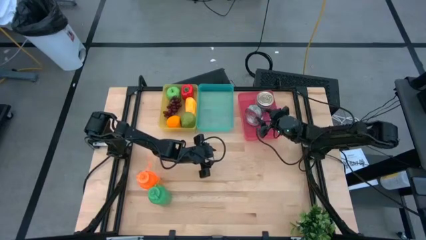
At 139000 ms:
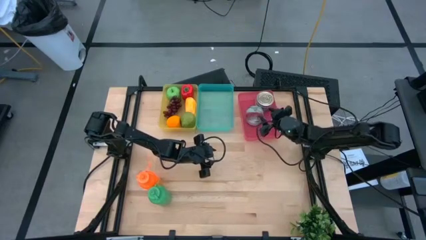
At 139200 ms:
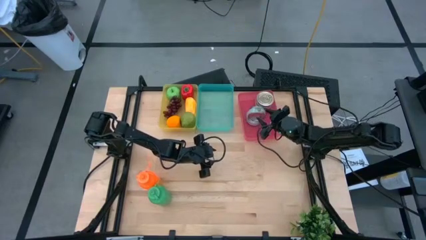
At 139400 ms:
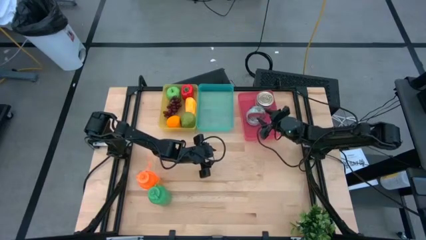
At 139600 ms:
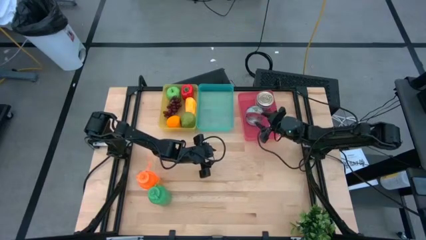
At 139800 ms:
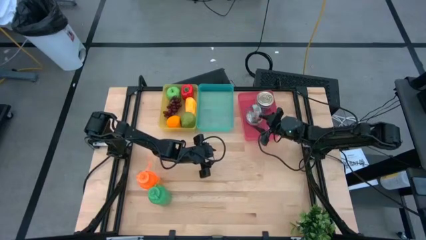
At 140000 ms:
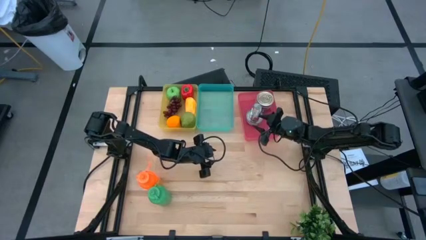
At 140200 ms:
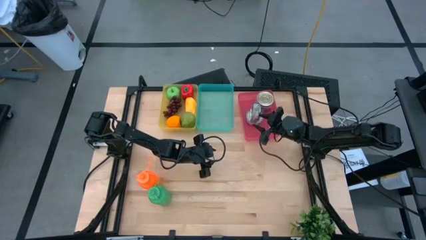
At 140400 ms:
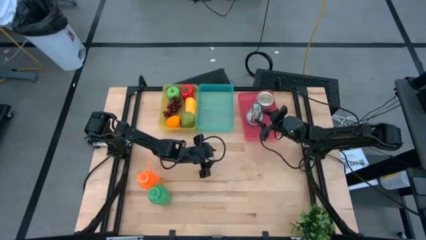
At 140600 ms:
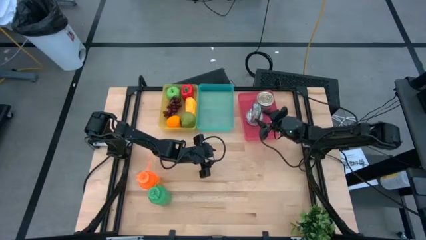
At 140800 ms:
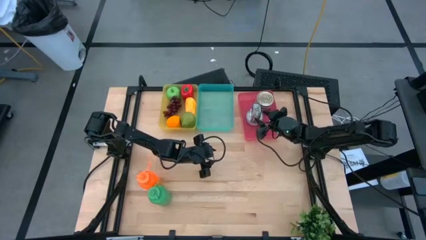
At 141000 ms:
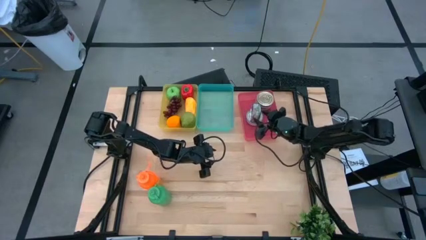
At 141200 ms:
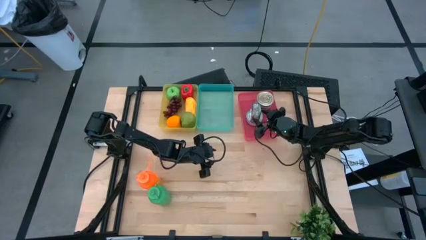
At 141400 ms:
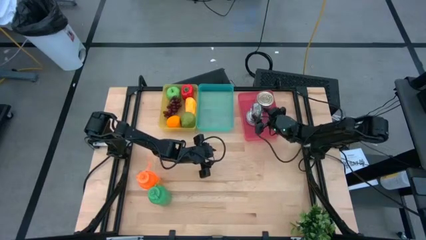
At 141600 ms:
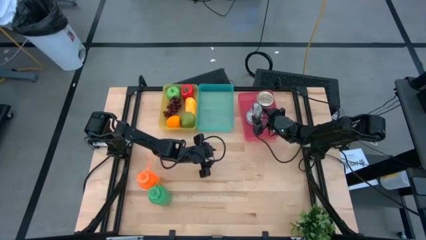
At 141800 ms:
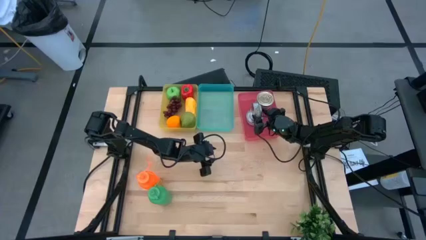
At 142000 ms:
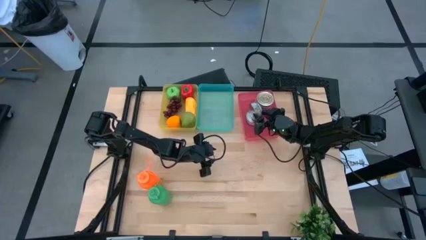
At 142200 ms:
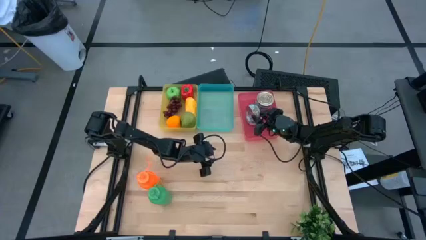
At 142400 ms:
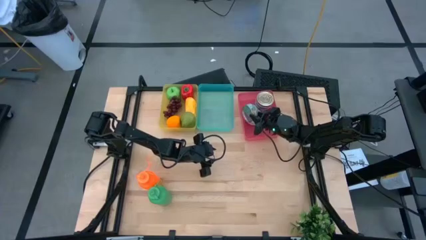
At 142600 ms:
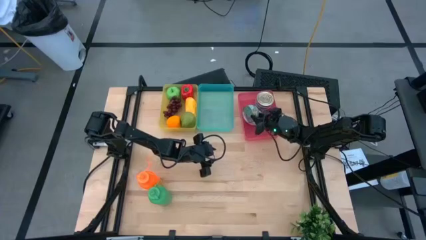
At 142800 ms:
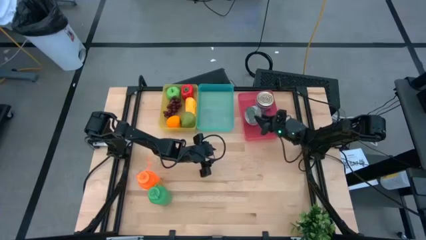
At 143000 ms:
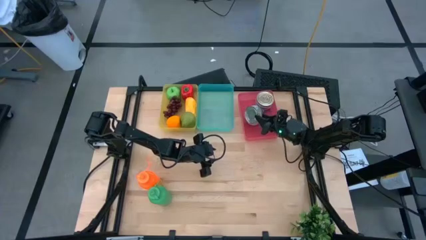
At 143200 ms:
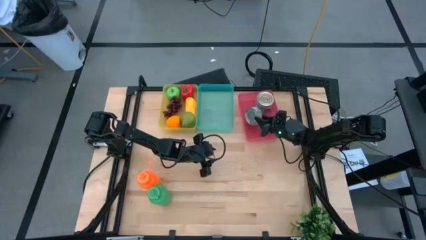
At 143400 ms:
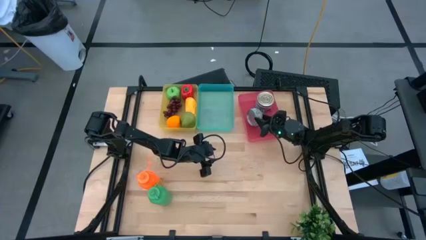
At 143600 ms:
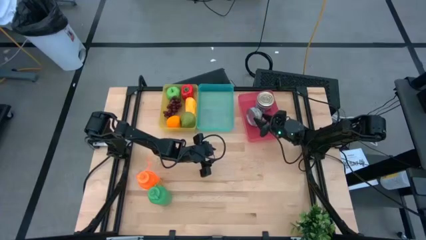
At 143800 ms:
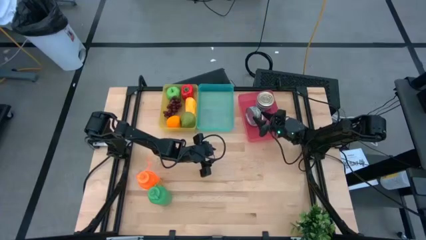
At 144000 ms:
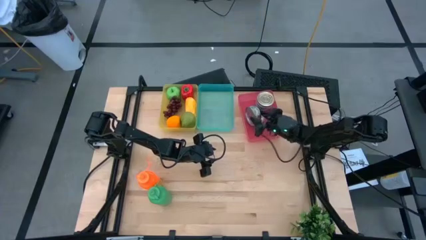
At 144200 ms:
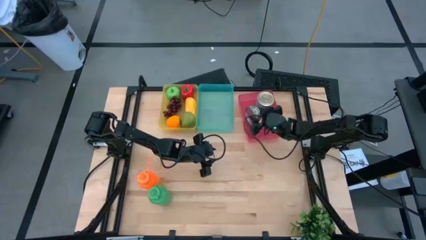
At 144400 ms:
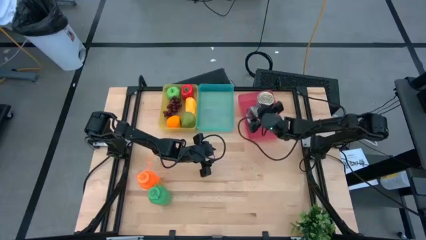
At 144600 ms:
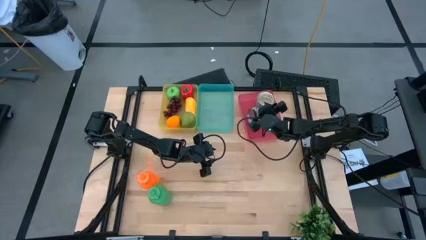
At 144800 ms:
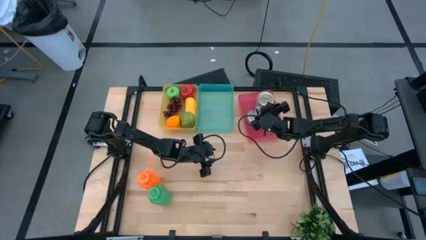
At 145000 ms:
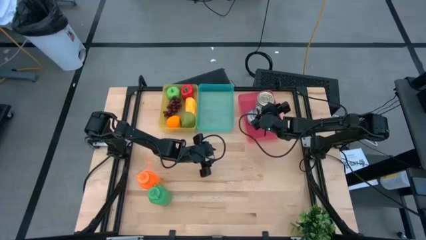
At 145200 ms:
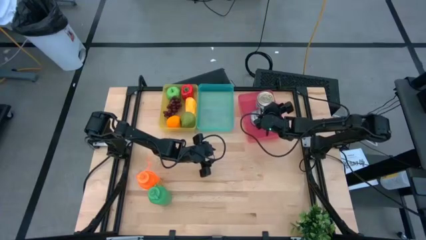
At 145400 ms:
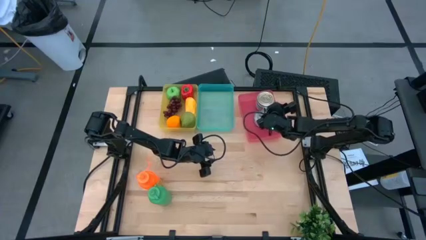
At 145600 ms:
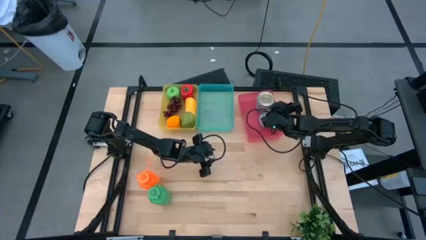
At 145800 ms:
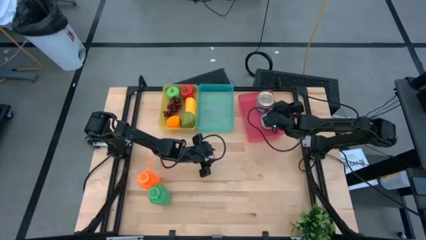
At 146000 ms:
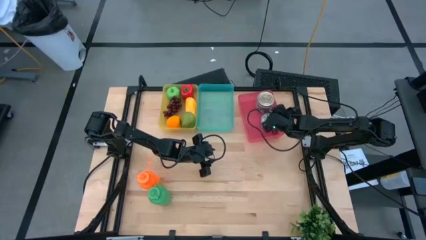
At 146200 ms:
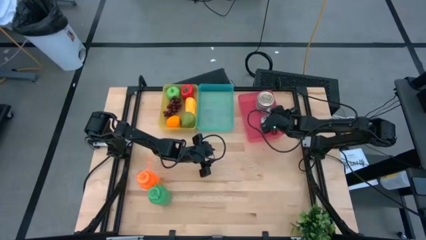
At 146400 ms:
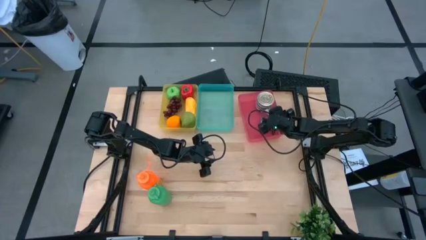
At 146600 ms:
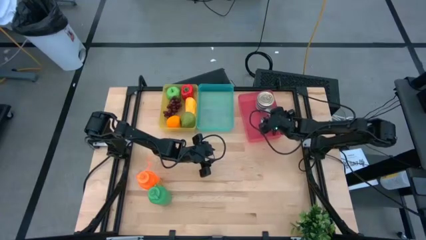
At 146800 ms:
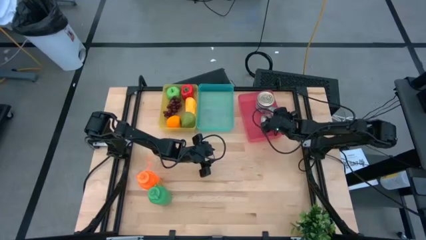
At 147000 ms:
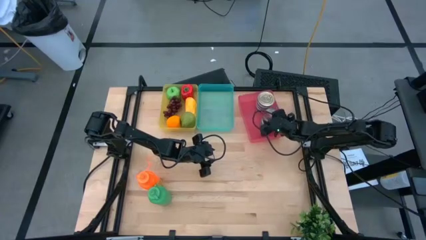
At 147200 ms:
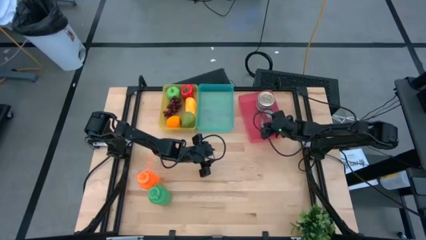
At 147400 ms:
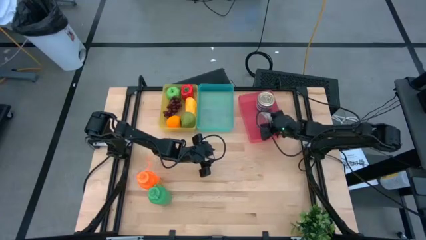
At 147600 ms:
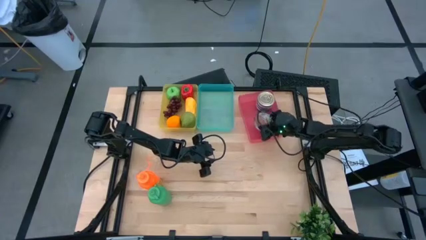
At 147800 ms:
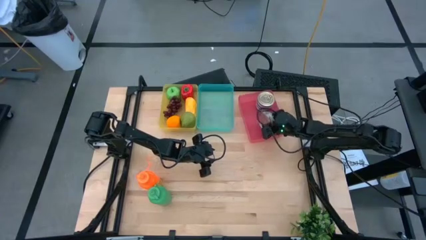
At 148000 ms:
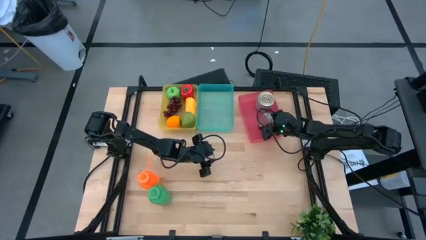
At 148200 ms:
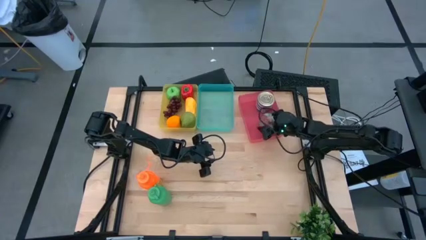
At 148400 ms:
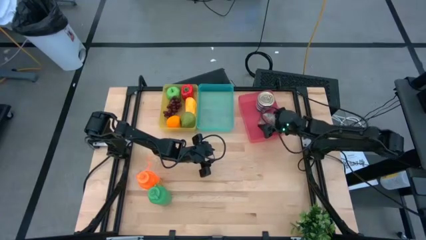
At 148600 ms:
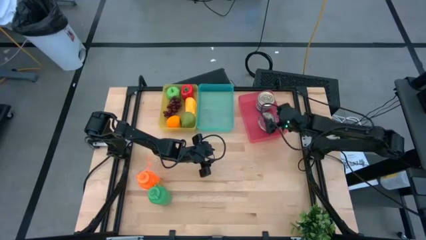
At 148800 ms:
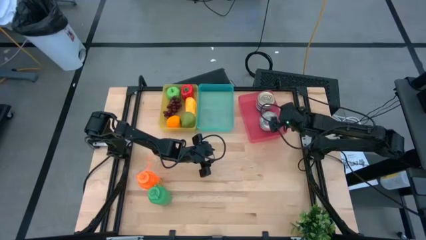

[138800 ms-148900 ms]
Task: Pick & Place Food Item
Put the green tuna can into the red bin
